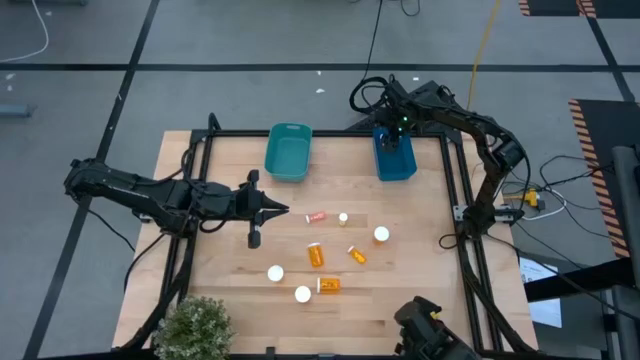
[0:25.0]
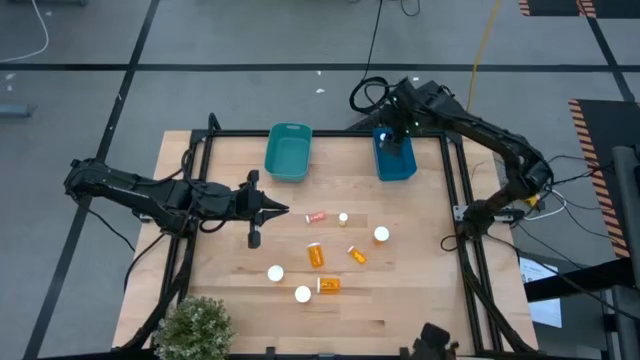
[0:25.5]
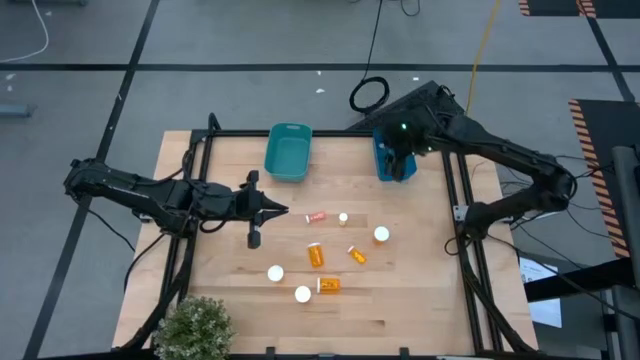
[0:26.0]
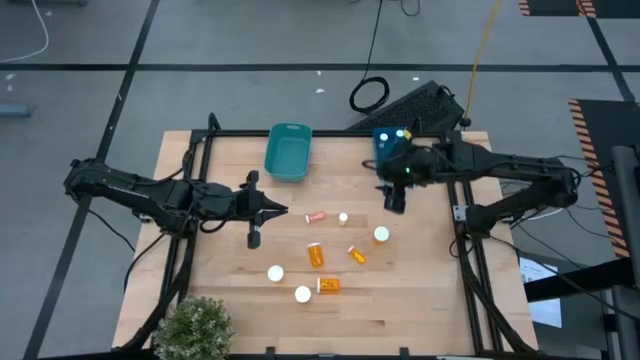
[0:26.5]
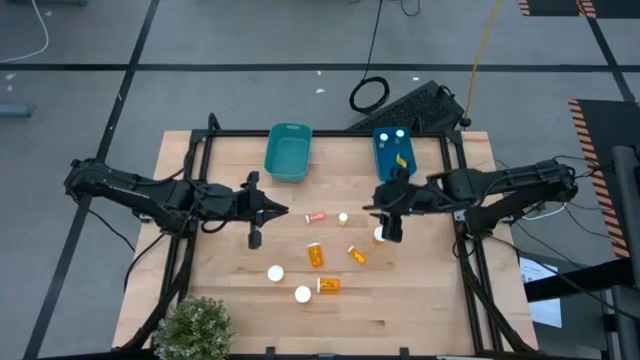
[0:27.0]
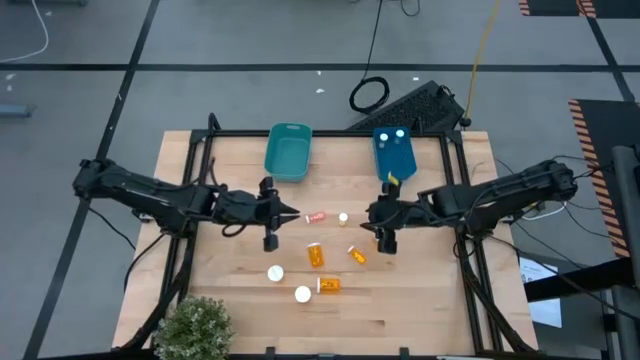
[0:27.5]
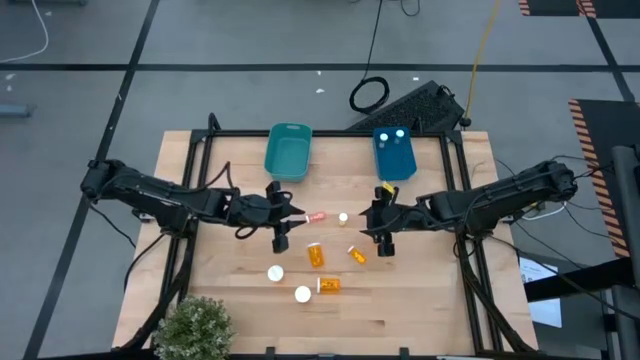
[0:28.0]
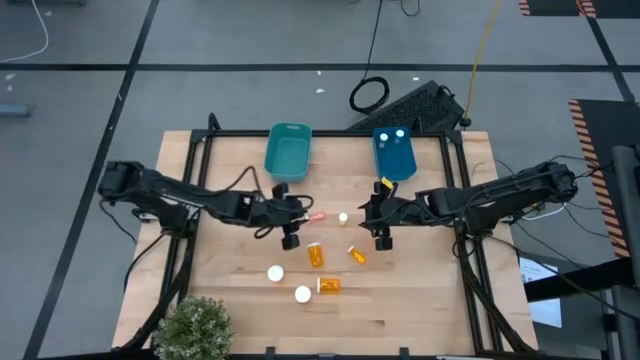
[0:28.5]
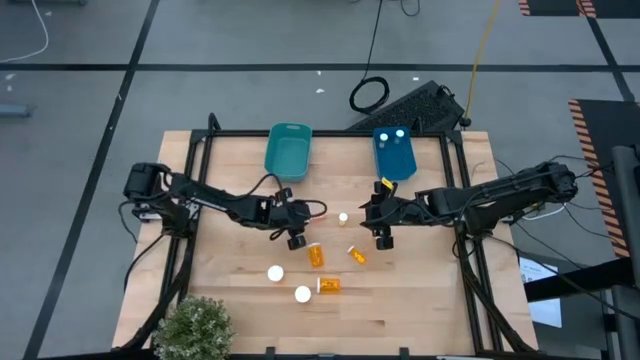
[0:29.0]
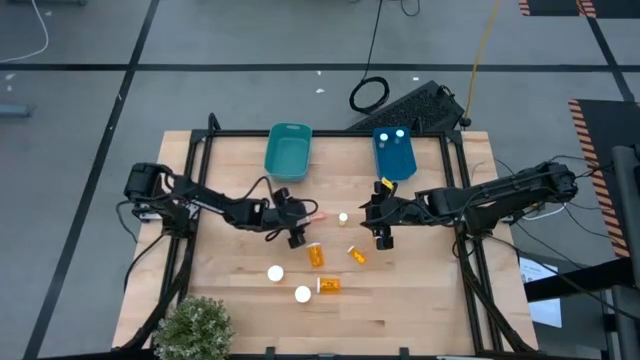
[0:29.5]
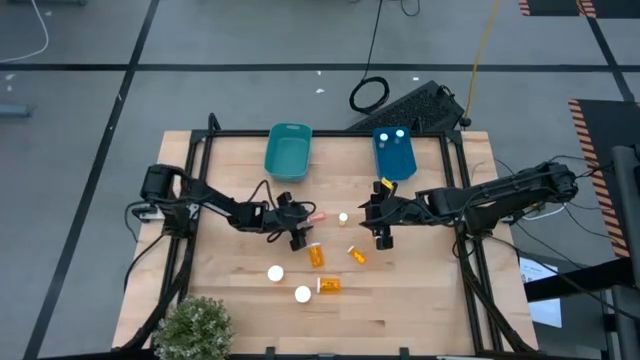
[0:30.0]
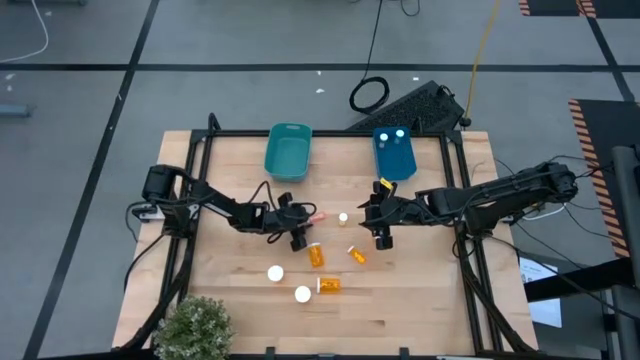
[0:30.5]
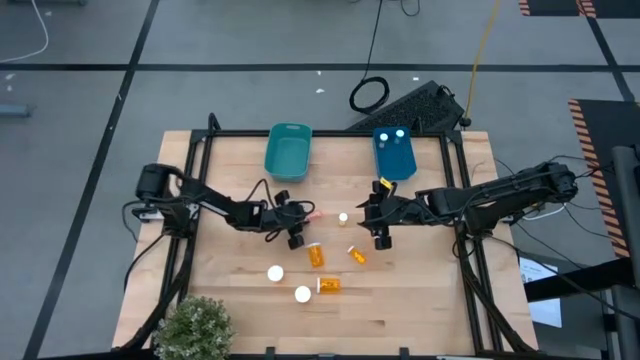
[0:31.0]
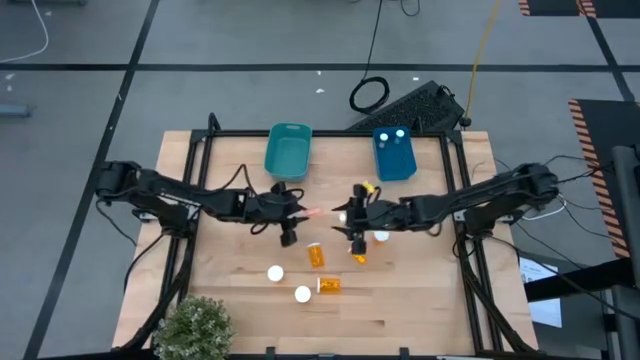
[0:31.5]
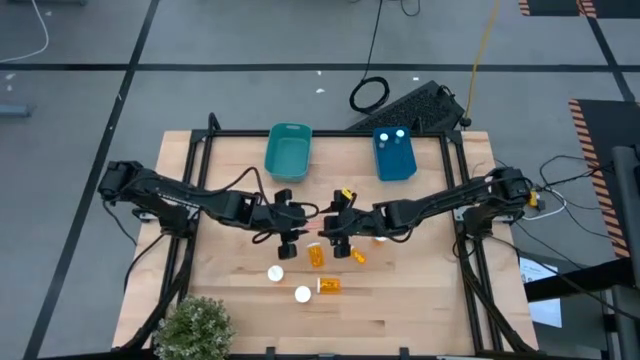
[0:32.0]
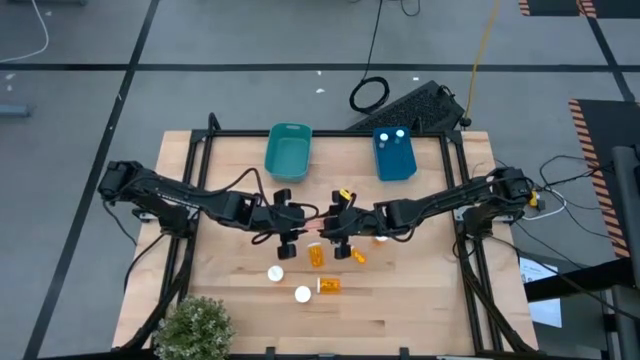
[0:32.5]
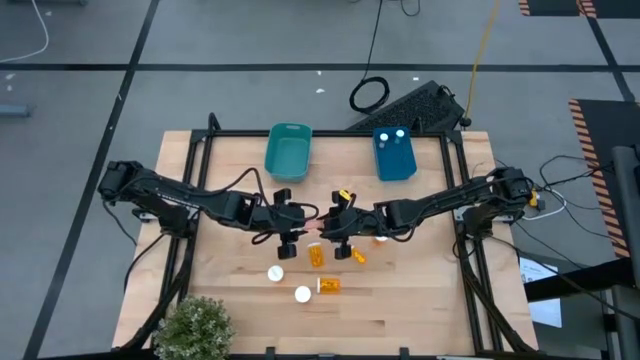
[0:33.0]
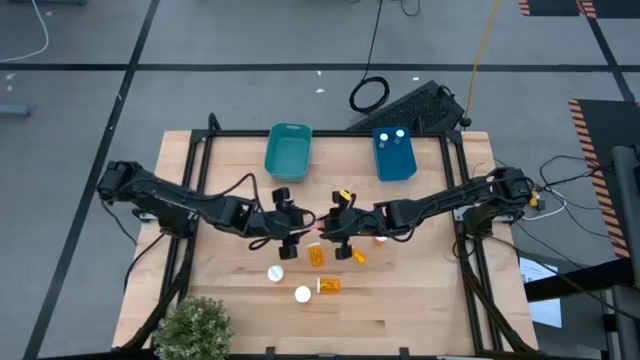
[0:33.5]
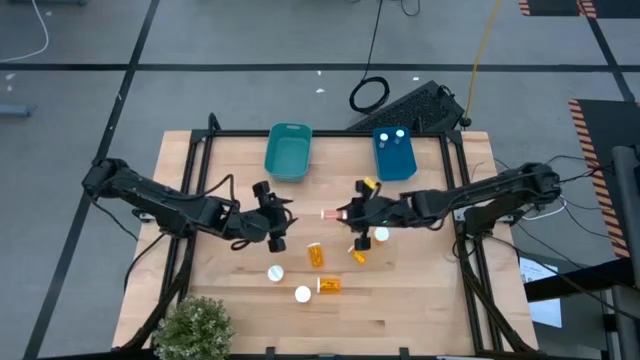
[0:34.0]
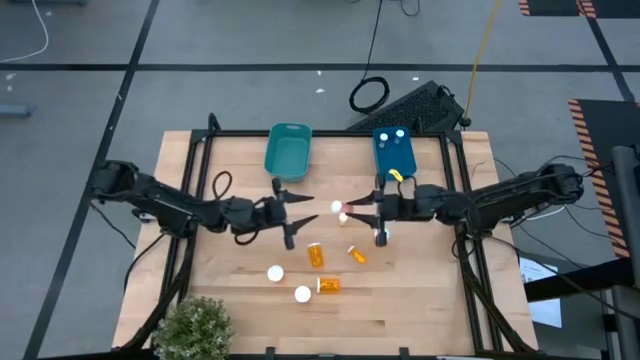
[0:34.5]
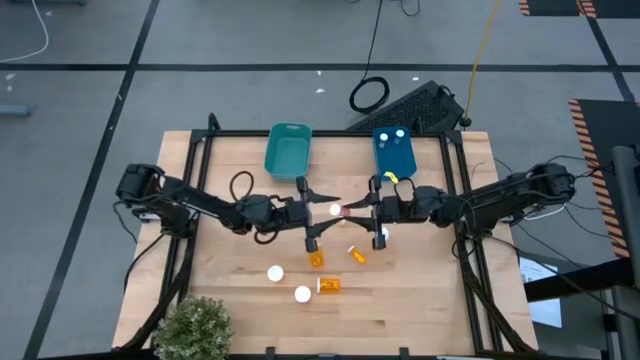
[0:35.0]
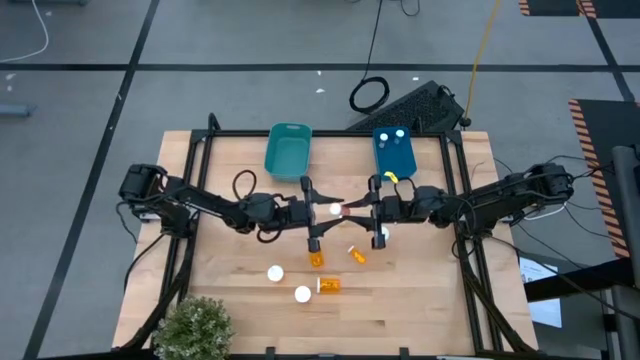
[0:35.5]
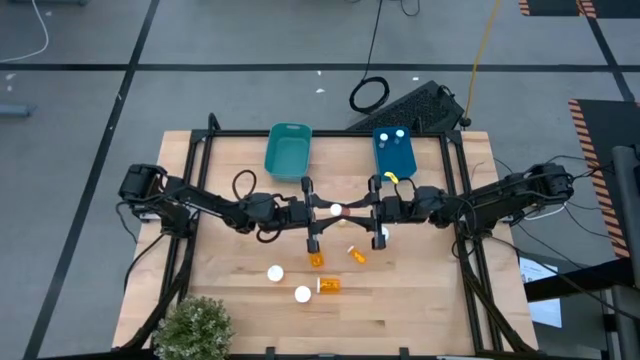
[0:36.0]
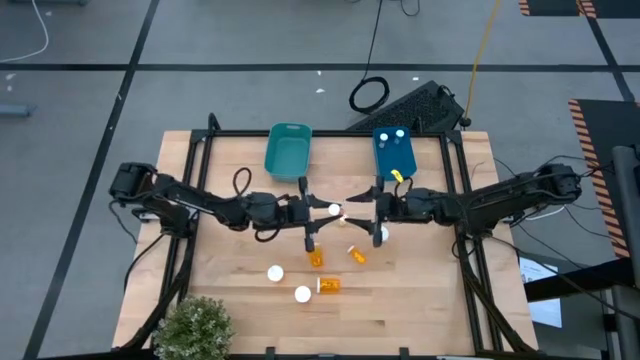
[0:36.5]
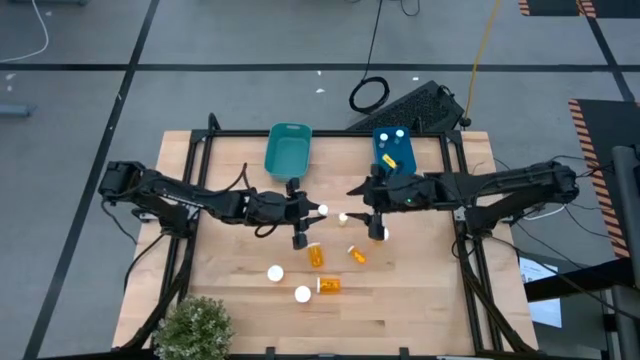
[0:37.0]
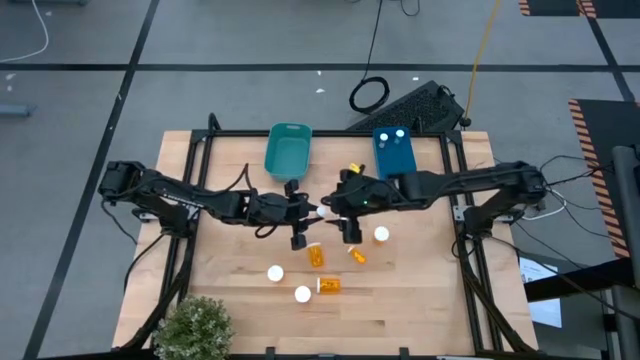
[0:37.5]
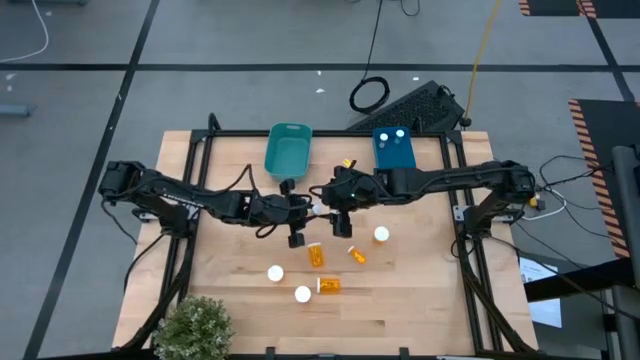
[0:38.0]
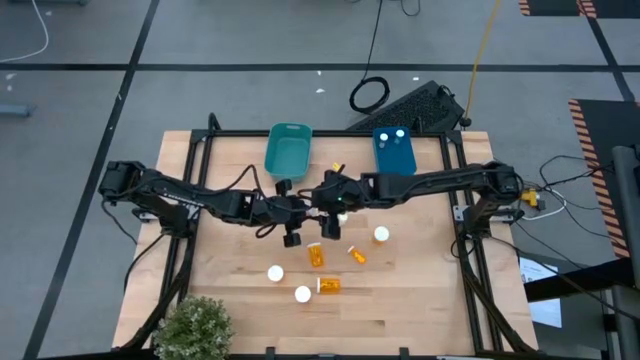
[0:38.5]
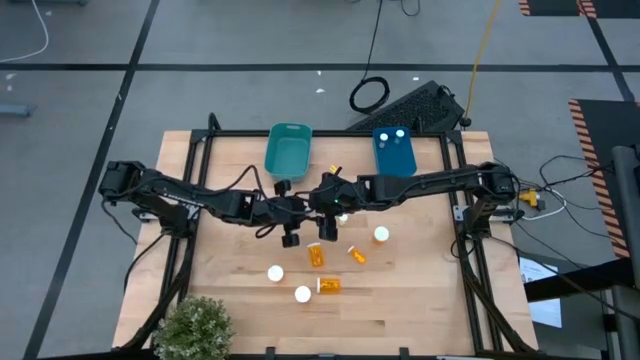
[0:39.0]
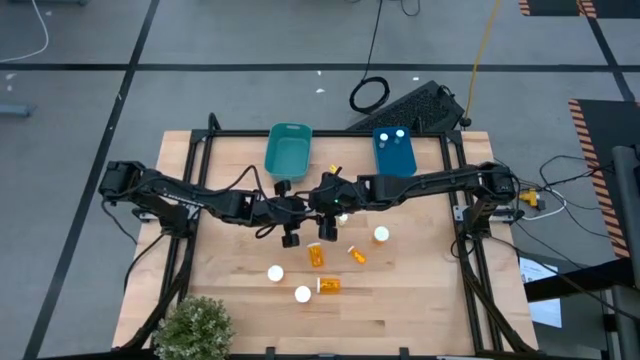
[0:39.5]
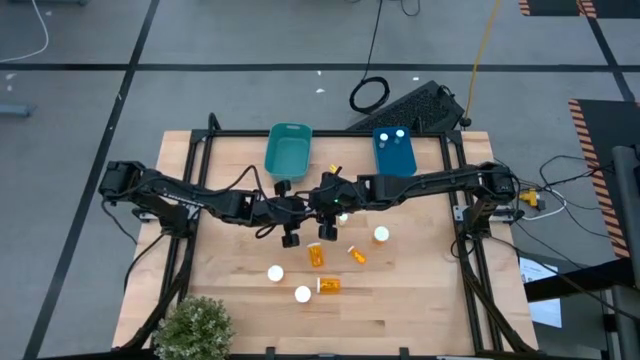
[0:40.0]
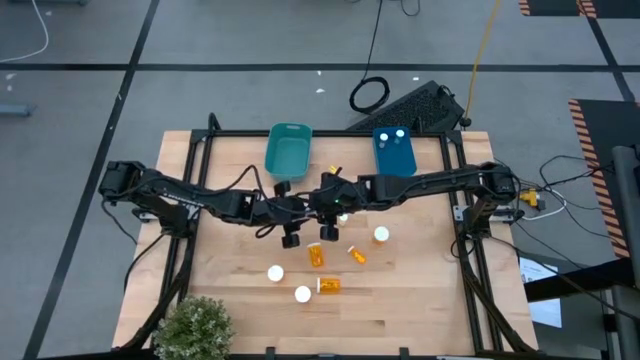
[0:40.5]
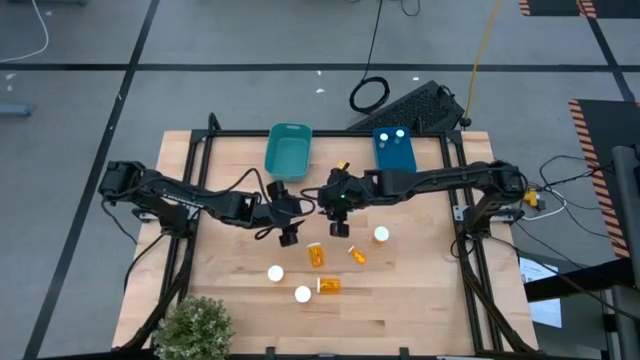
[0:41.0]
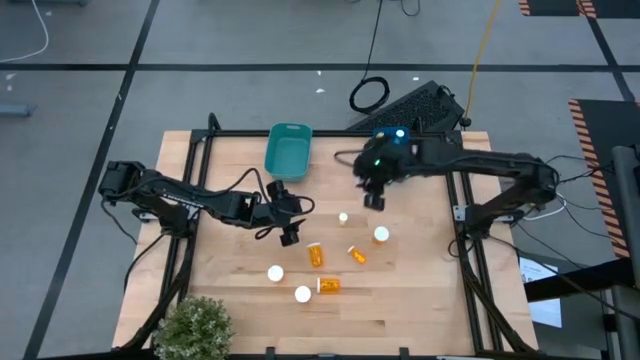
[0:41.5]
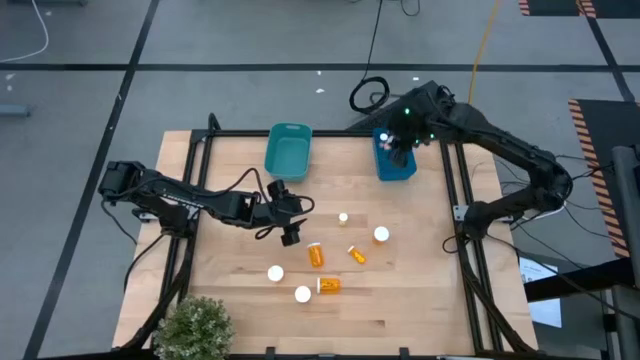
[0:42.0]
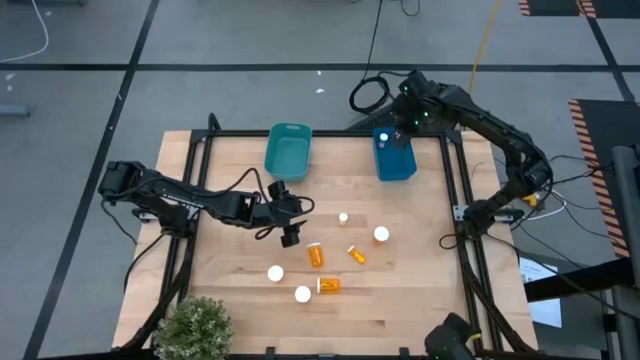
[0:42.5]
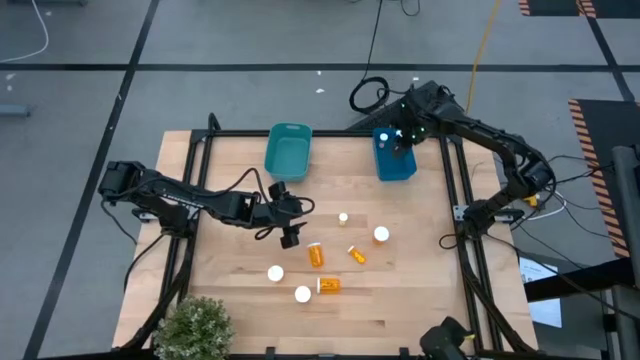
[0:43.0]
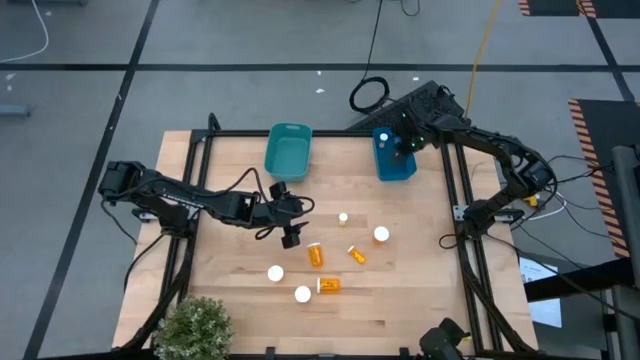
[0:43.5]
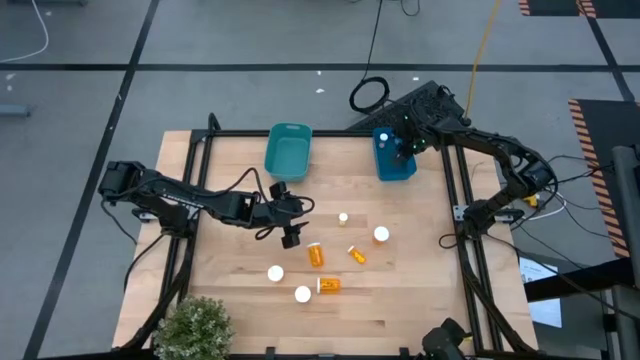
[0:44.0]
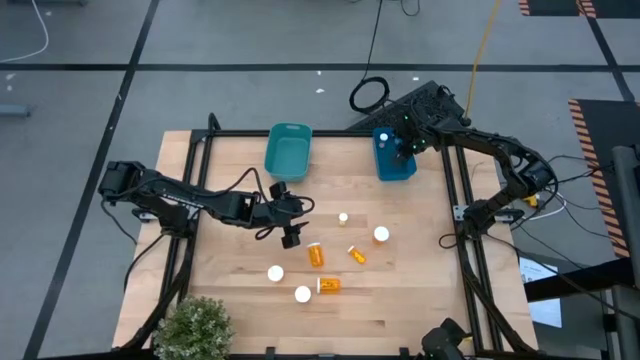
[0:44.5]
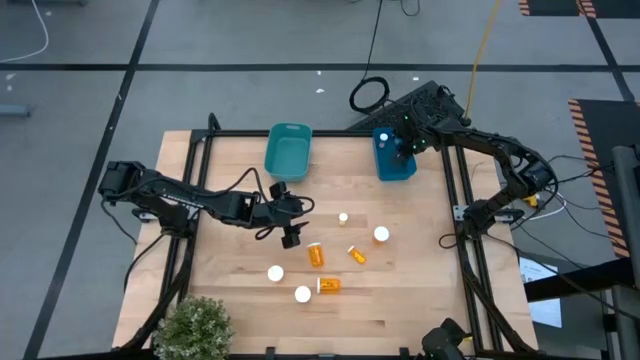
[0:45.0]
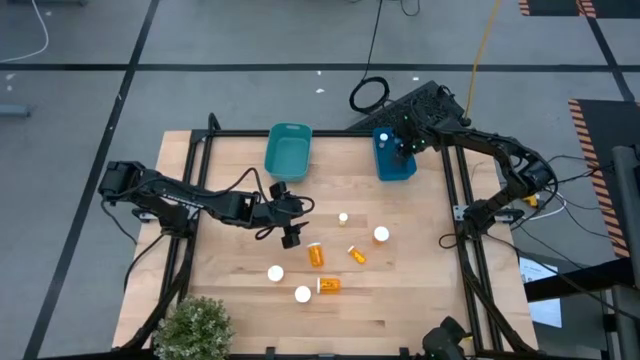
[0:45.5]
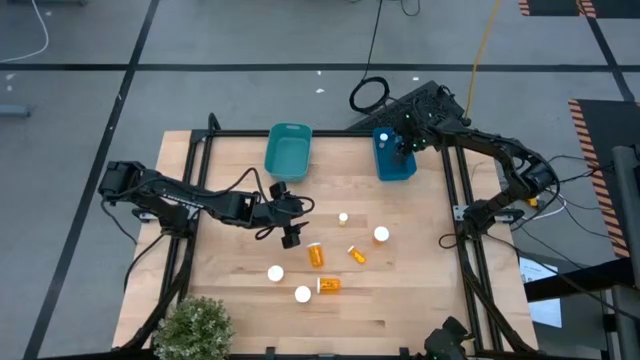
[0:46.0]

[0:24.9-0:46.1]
Task: Pick and place medicine bottles into bin by pill shape (circle, oval)
Put the small pink pill bottle into the blue bin
